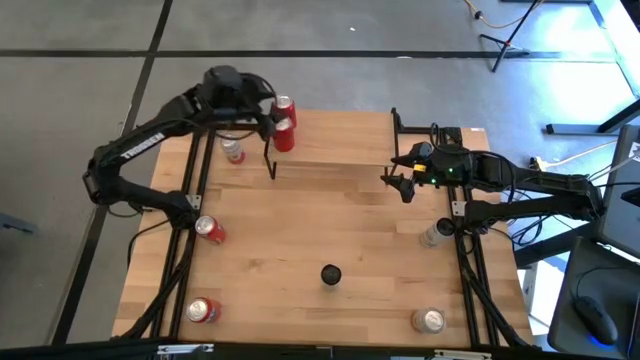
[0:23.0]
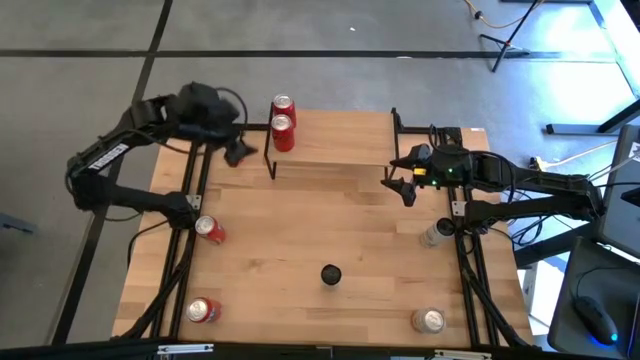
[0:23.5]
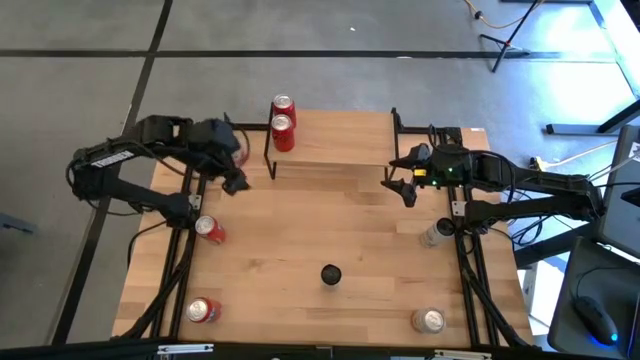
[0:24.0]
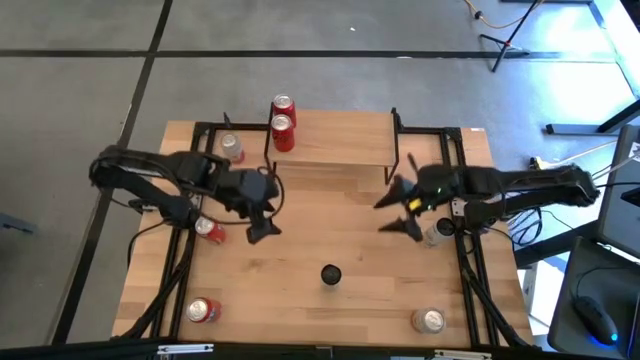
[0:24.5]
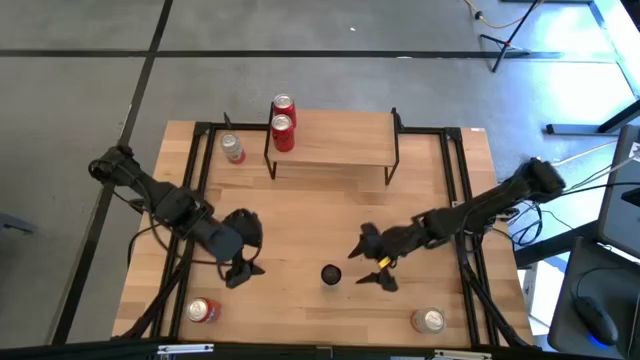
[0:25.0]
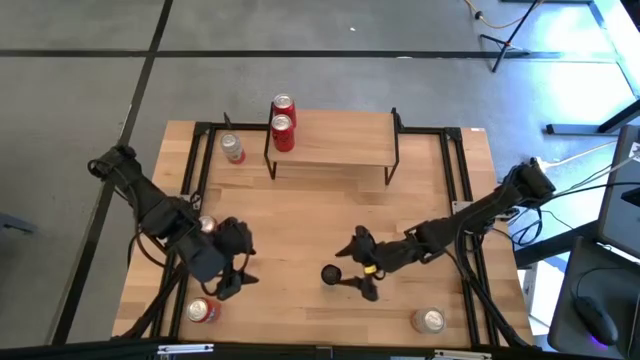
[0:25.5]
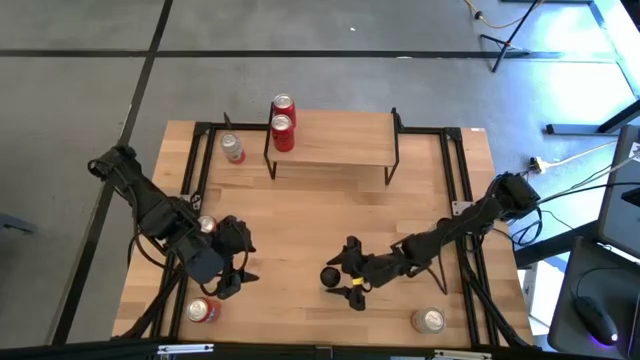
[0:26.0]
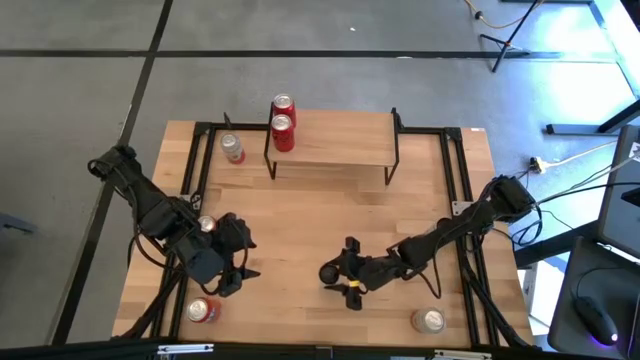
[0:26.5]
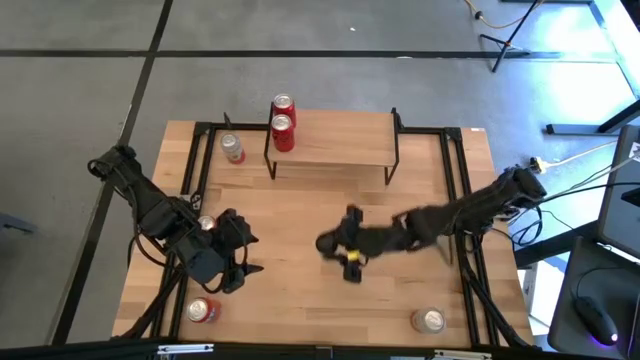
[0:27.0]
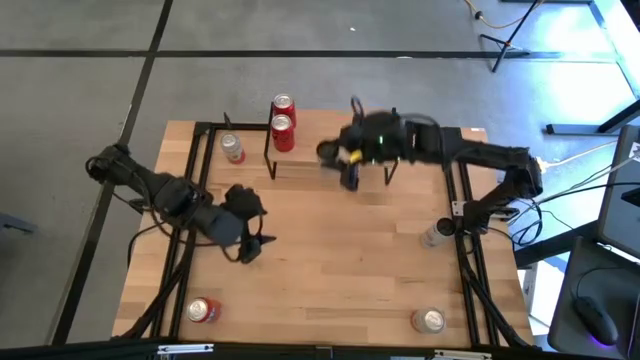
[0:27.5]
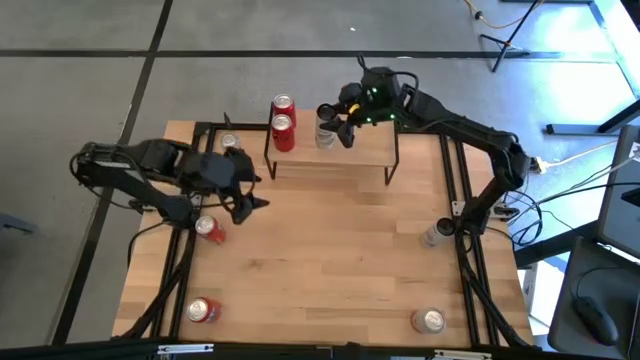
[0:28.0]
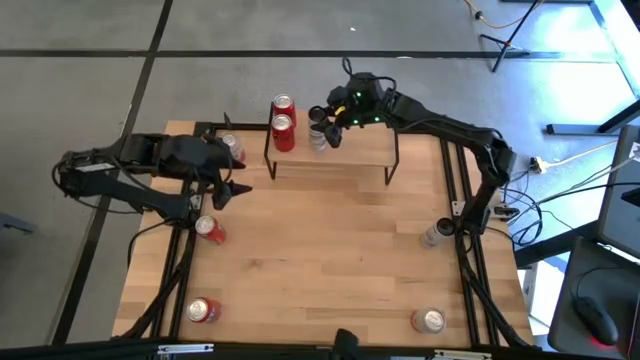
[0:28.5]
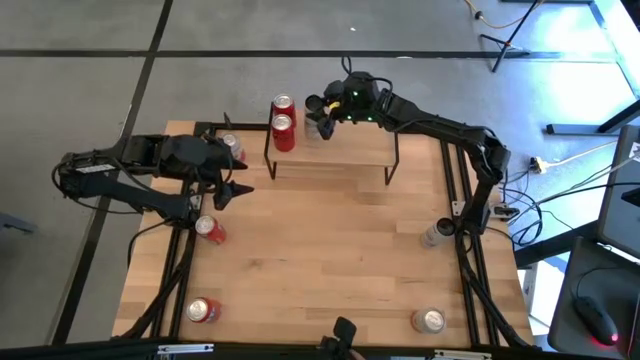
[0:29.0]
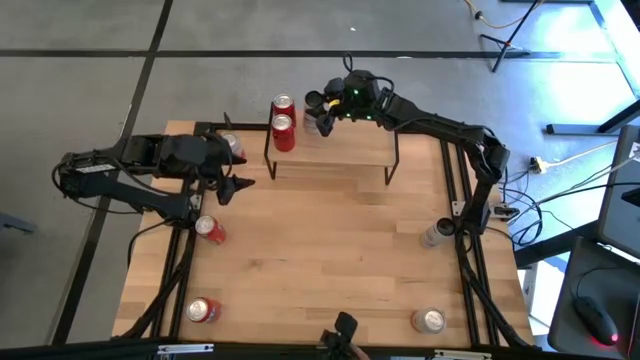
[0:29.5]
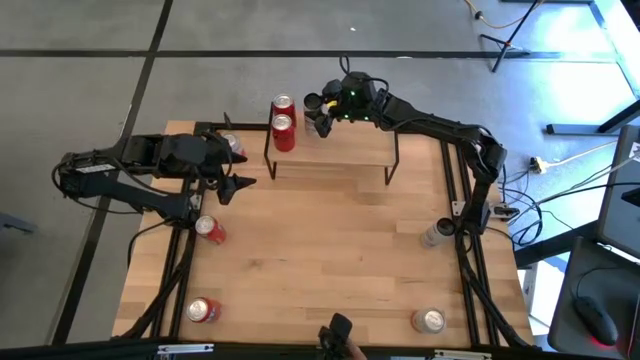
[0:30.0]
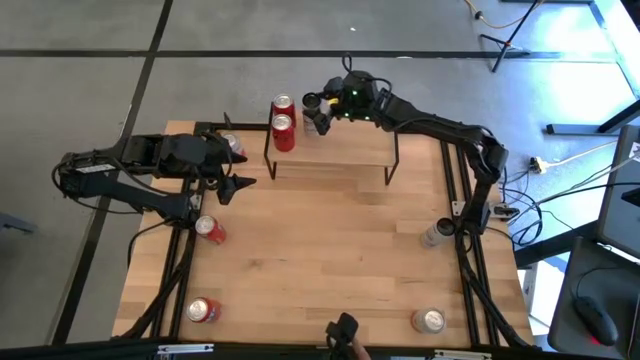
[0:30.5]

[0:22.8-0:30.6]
Task: Place canned beverage on shelf
Put the left white and blue soda can on the shelf

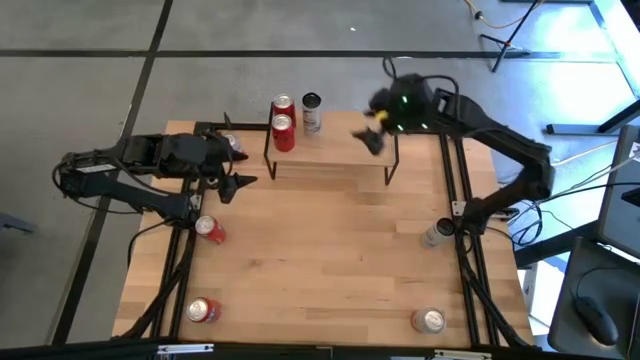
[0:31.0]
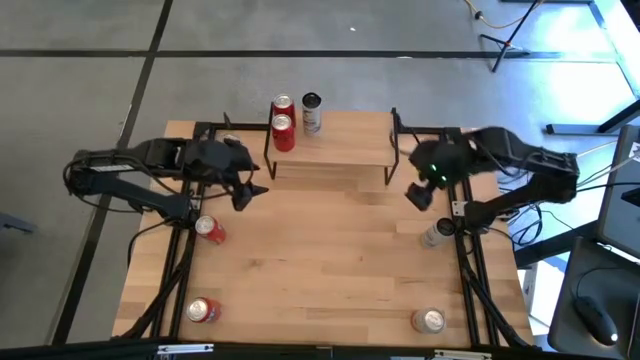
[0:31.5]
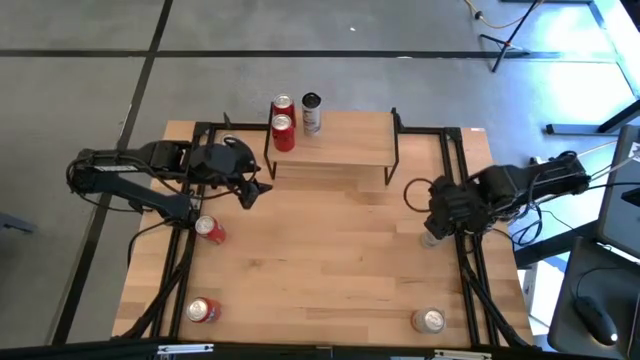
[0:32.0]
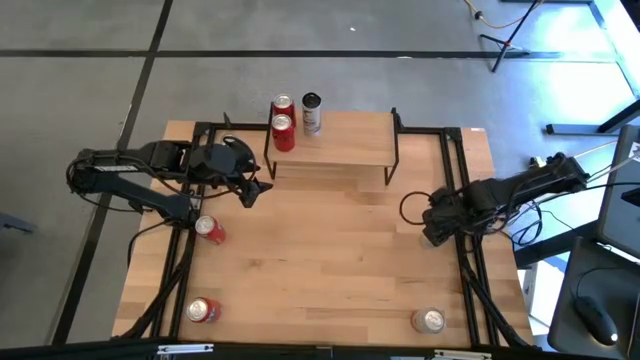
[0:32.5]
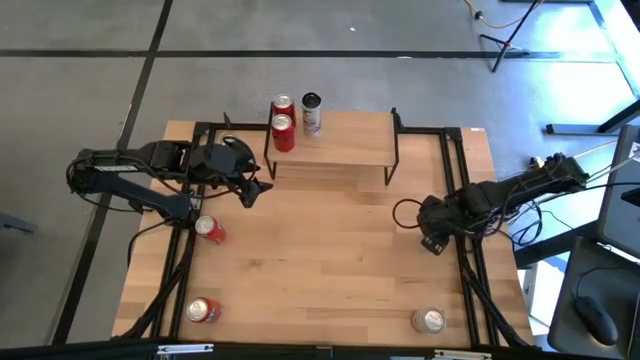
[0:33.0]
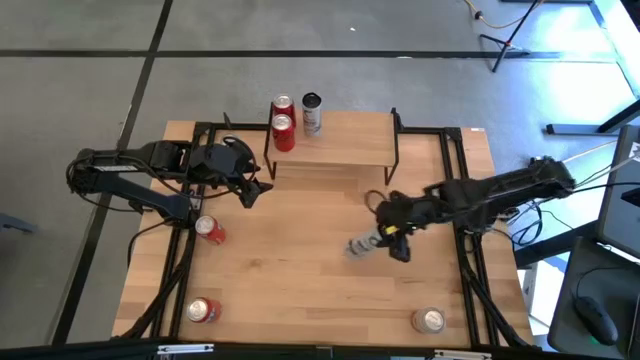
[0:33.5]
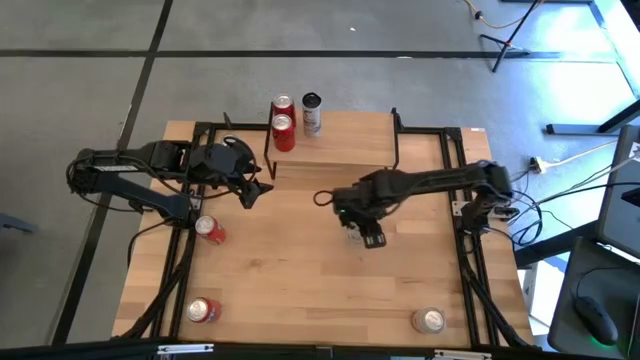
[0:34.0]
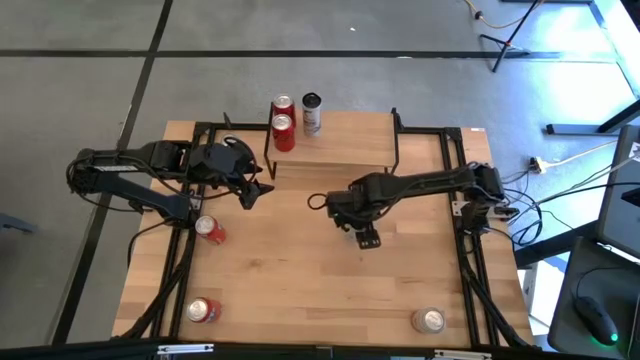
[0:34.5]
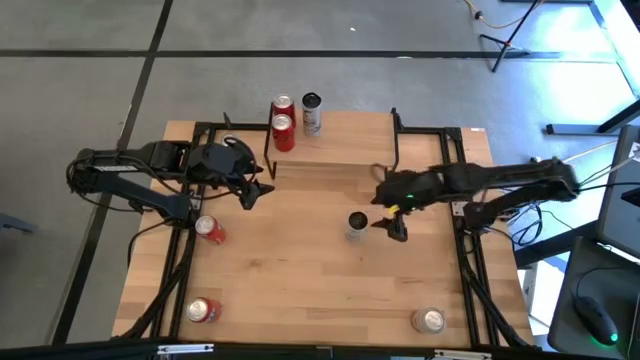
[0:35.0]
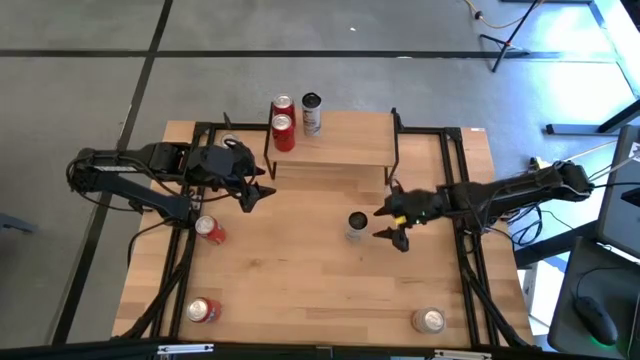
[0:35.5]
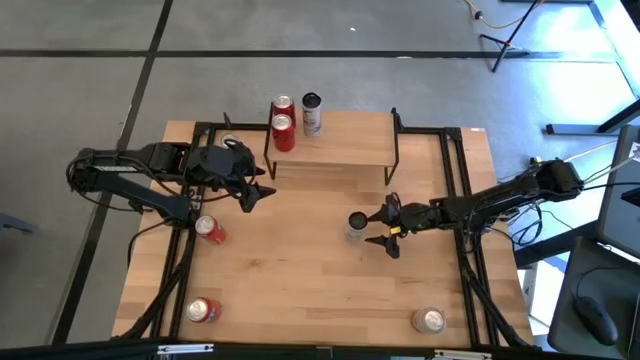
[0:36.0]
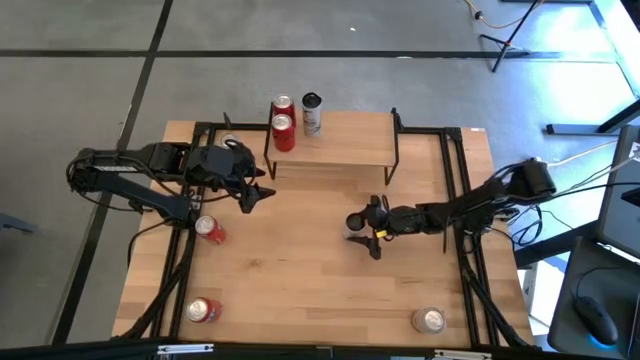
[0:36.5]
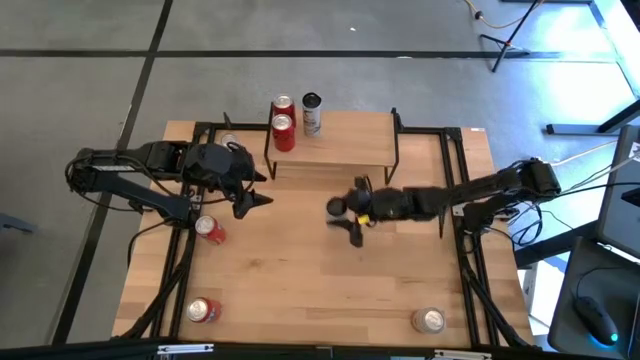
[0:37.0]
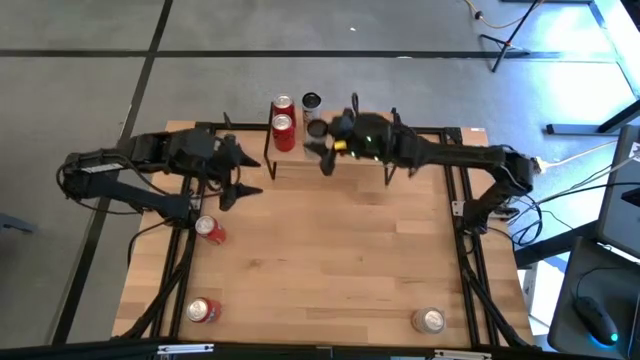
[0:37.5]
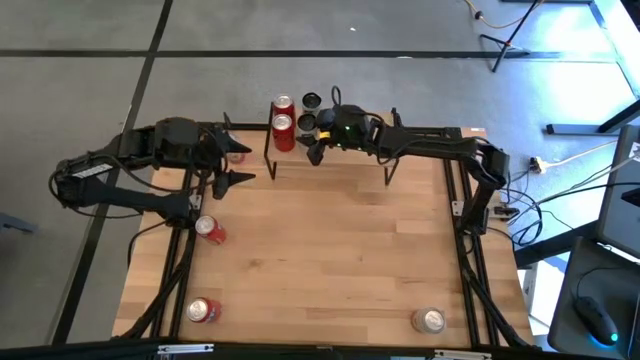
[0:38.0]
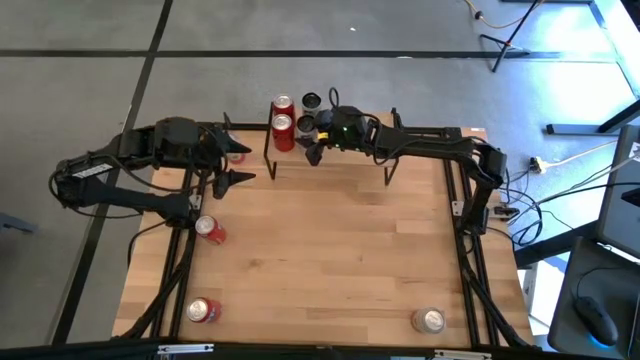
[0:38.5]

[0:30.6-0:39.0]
Put the white and blue soda can on the shelf aligned with the other white and blue soda can

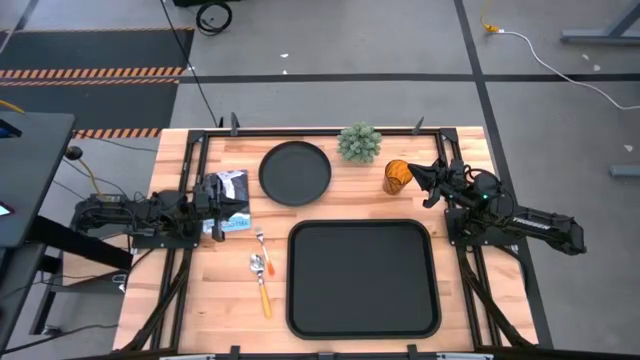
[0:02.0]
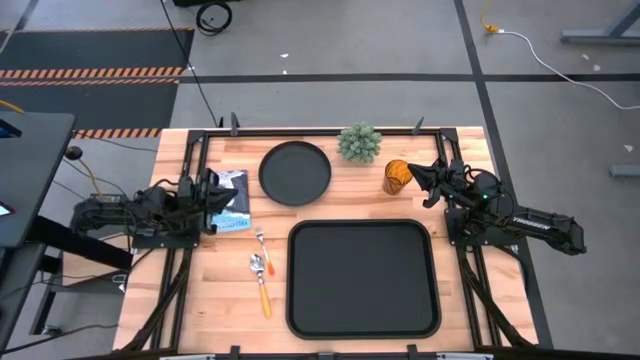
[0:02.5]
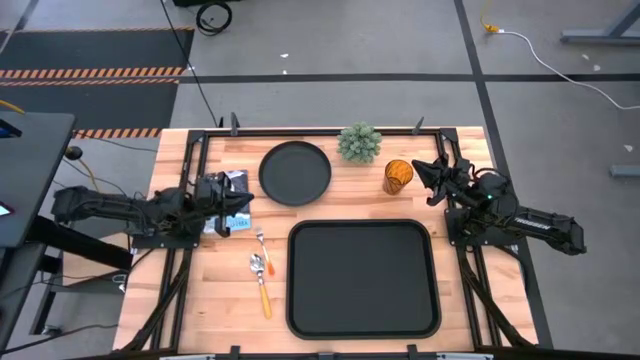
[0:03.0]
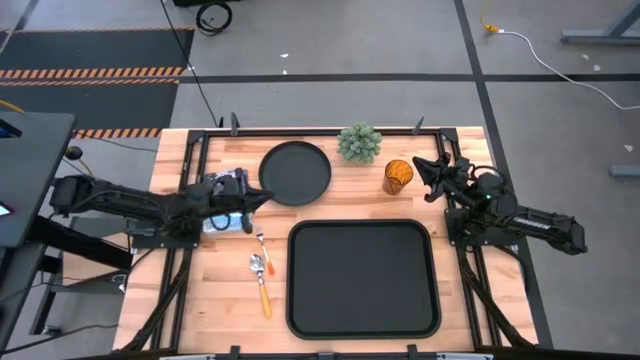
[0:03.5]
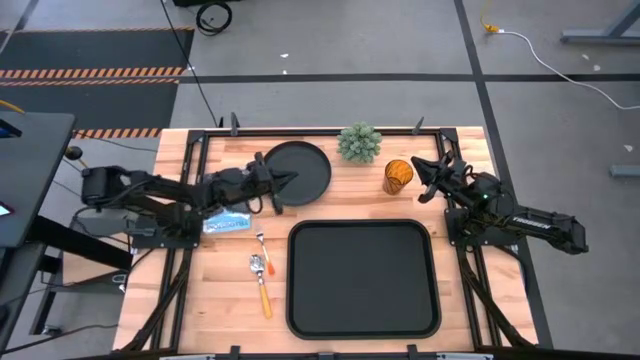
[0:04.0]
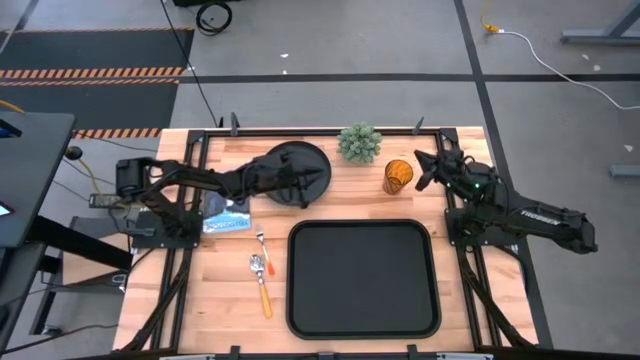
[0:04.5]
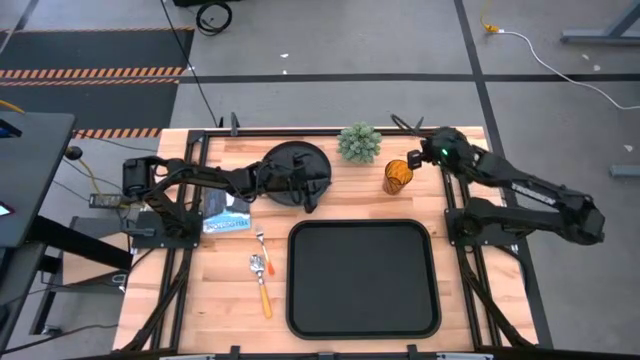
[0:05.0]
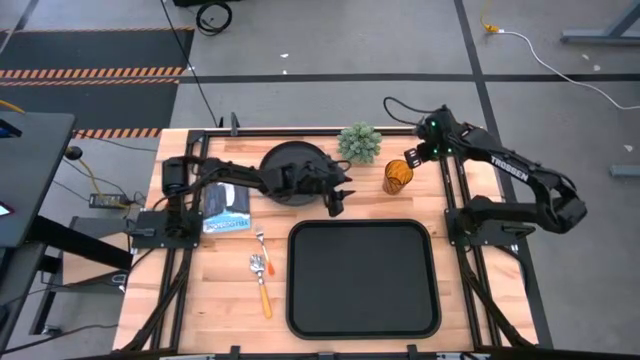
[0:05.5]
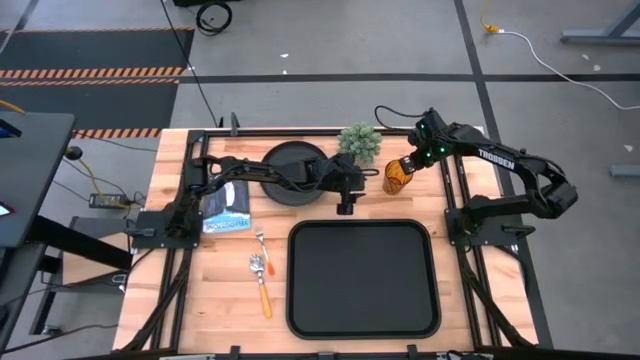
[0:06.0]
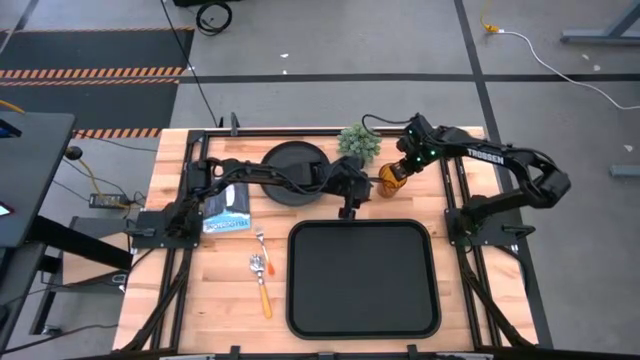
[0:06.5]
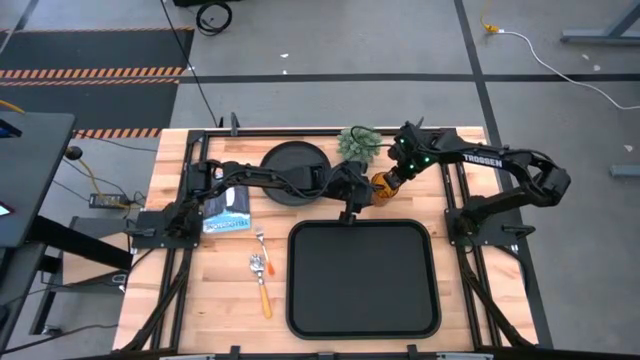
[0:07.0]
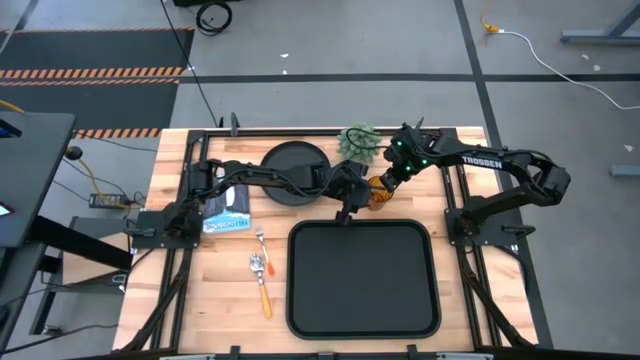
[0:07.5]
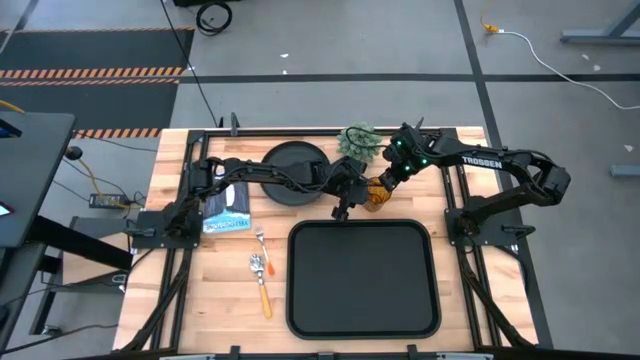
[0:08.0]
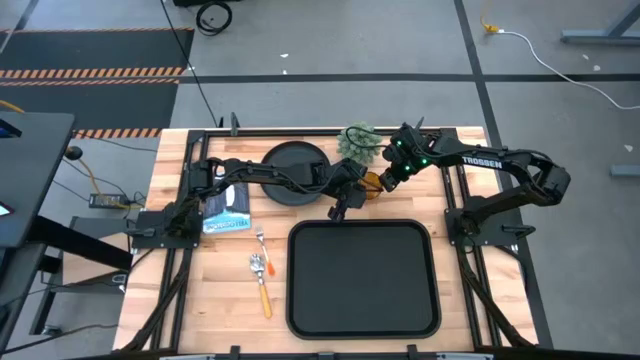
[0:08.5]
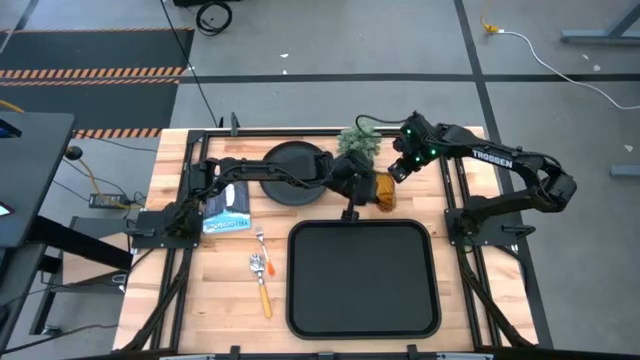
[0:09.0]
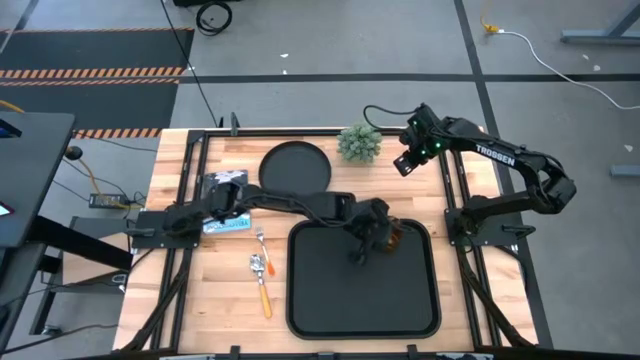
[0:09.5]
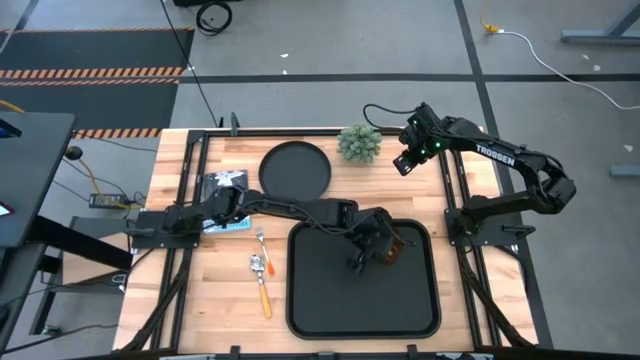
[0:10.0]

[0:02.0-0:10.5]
Task: Pick and place plate/cup/fork/spoon on tray
Put the brown cup on the black tray
